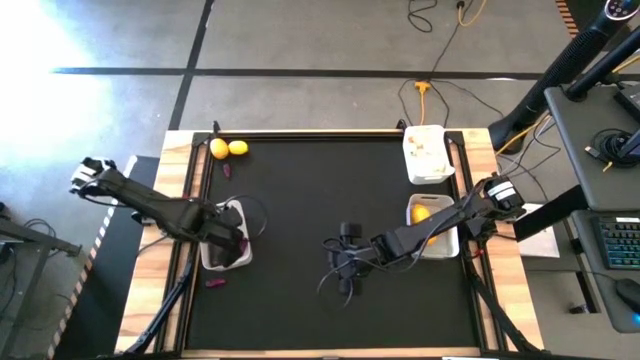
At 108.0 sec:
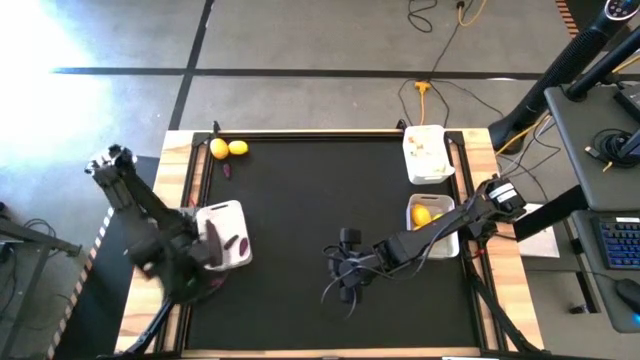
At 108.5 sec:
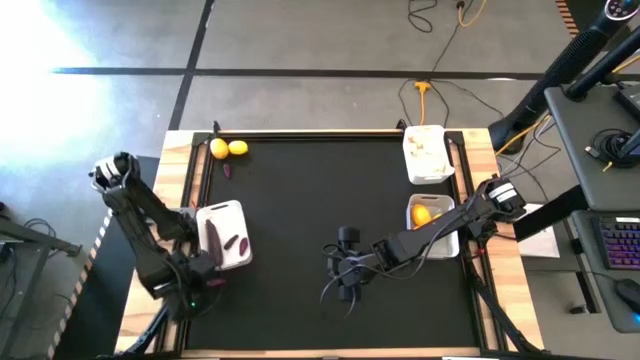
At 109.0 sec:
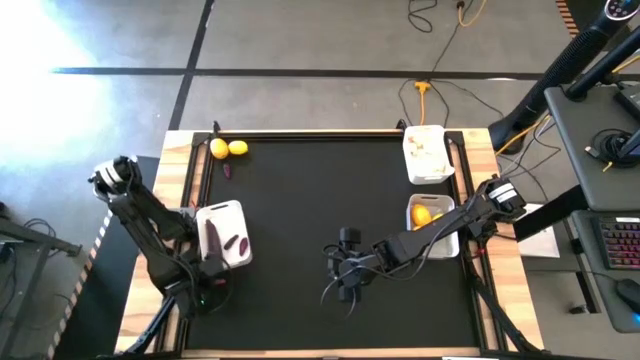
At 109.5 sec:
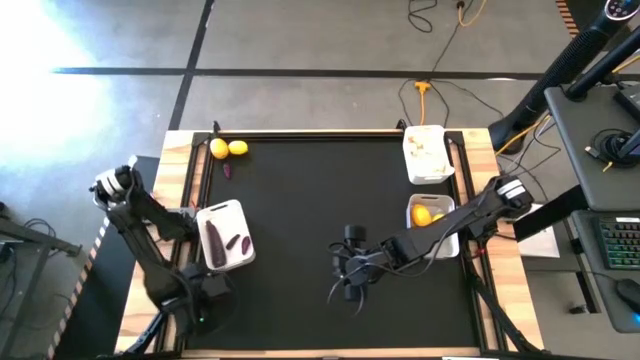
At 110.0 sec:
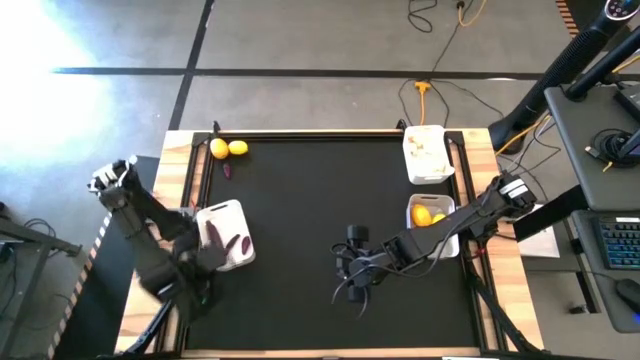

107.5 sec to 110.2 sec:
Task: Sort produce into baskets
Put the eggplant into the bottom white bin

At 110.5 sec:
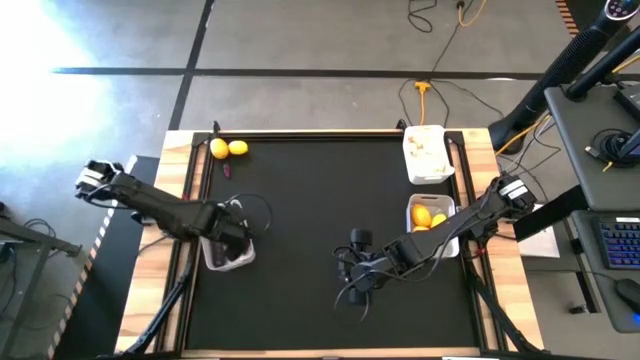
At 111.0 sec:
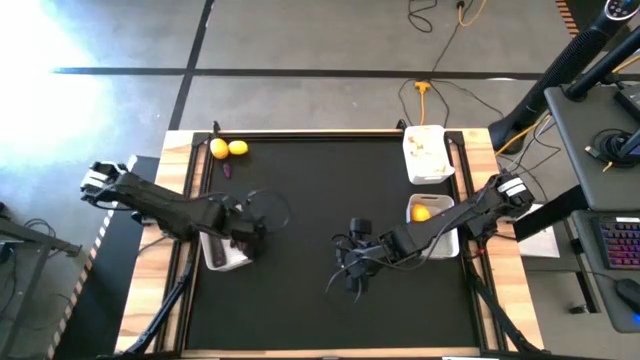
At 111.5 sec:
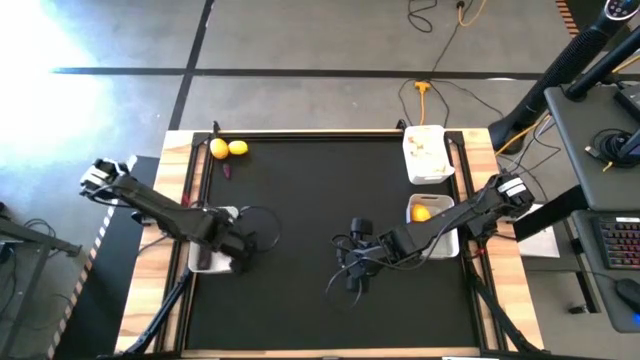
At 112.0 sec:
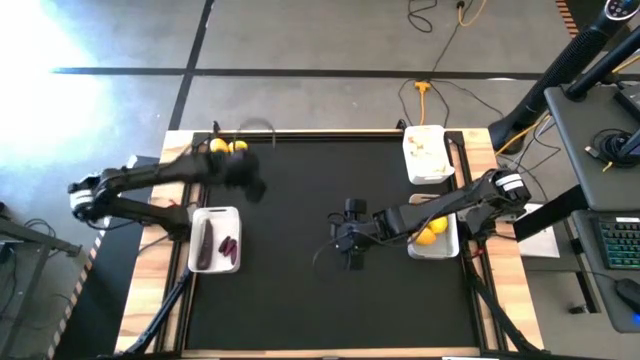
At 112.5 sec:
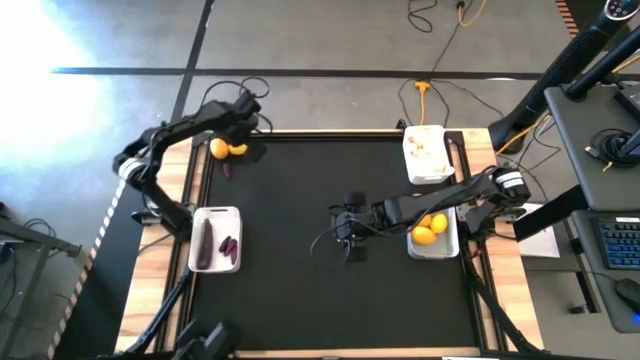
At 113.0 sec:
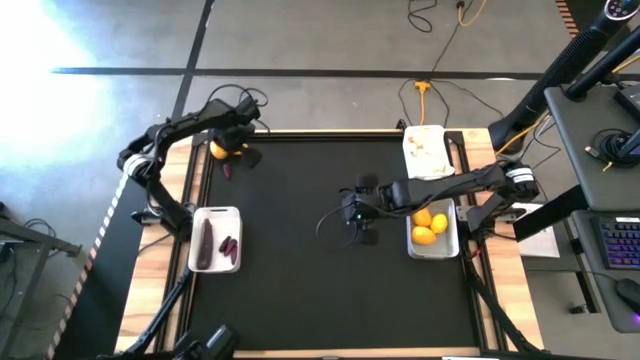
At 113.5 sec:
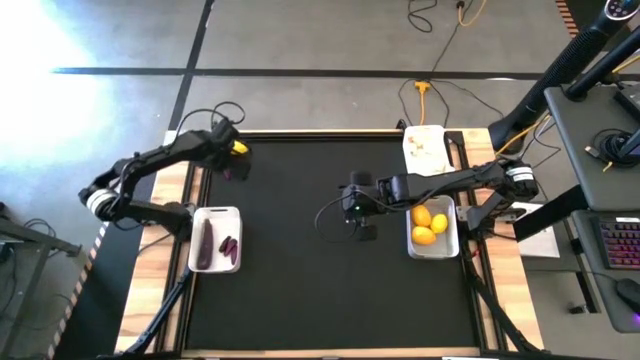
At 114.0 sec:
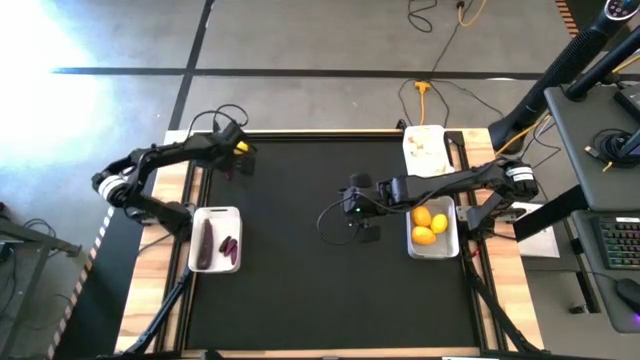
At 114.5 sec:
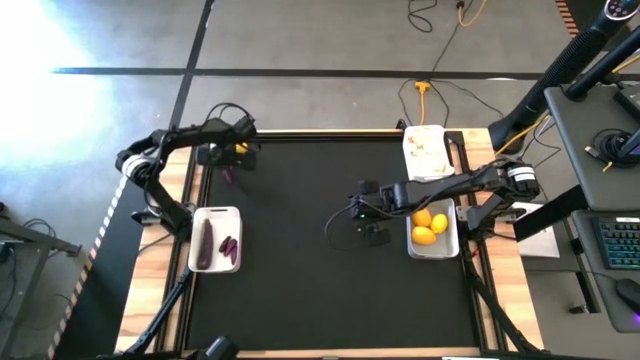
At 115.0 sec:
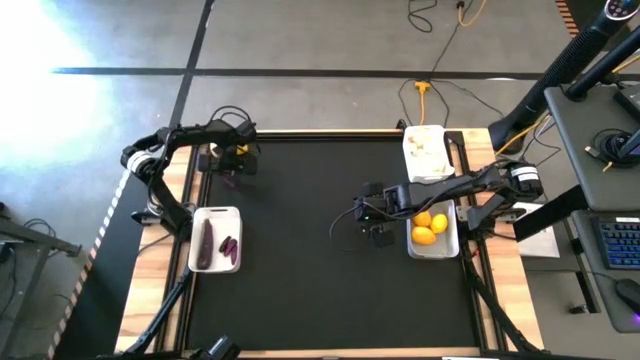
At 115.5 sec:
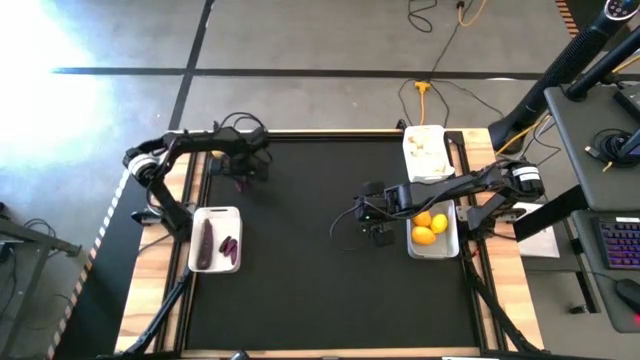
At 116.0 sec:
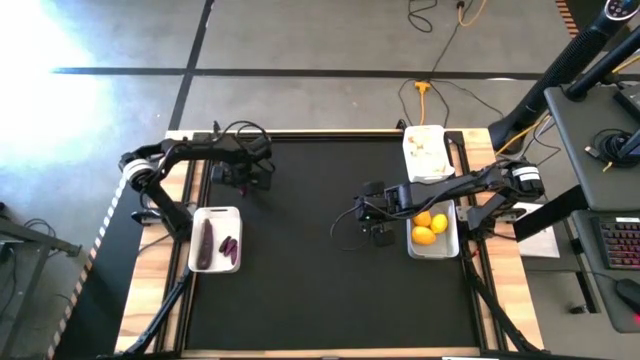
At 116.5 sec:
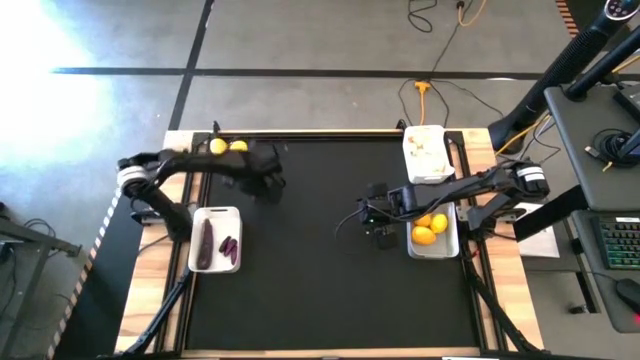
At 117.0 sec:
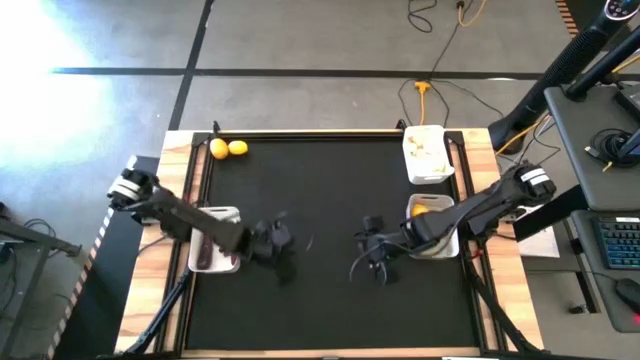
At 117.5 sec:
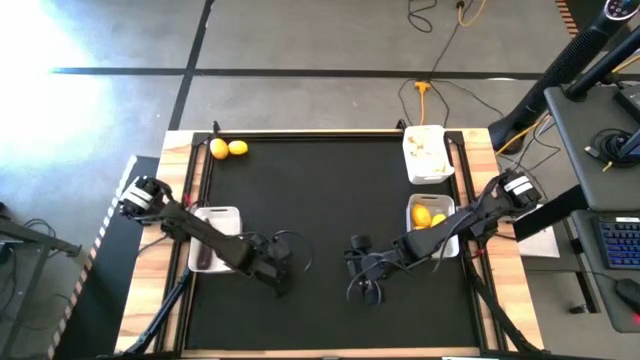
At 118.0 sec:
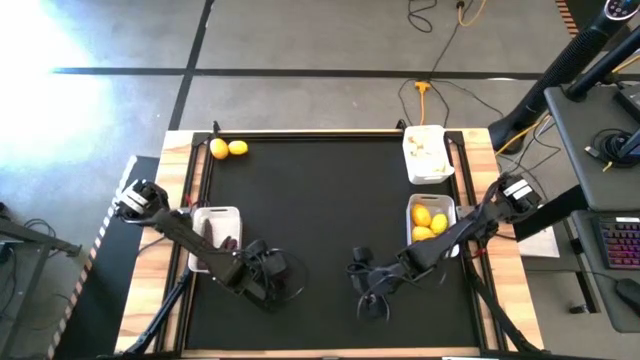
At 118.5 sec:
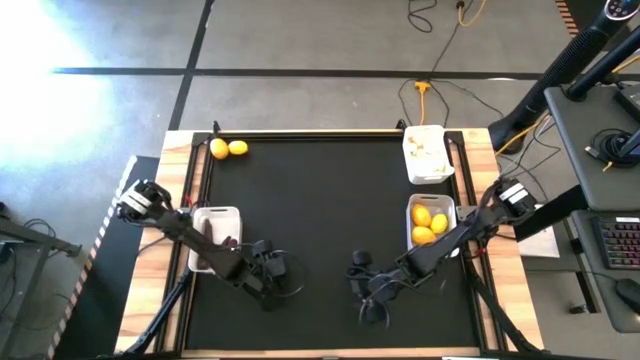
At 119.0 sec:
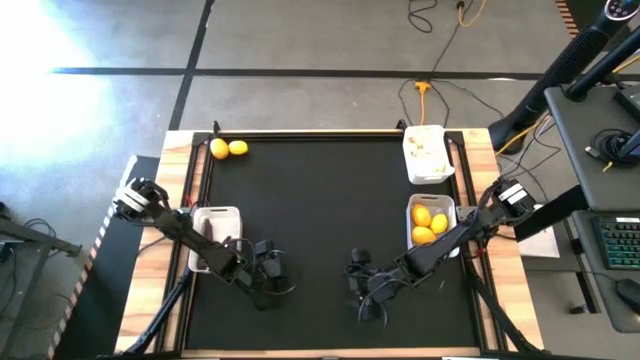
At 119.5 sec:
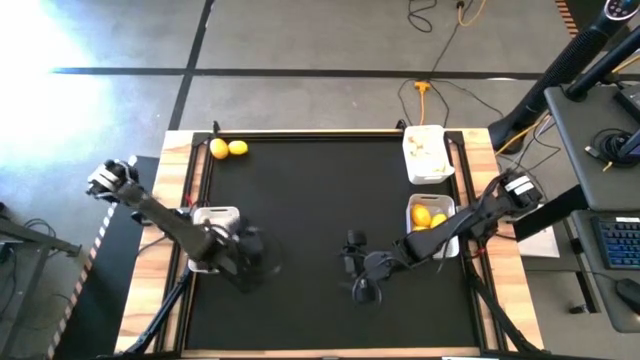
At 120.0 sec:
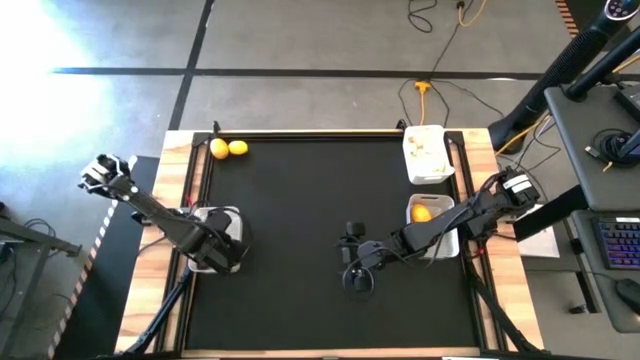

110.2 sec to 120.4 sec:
Put the eggplant into the bottom white bin

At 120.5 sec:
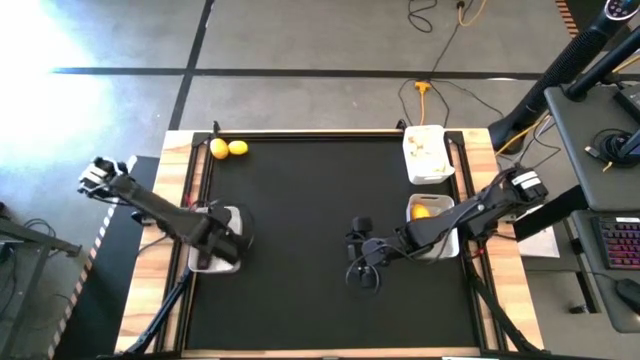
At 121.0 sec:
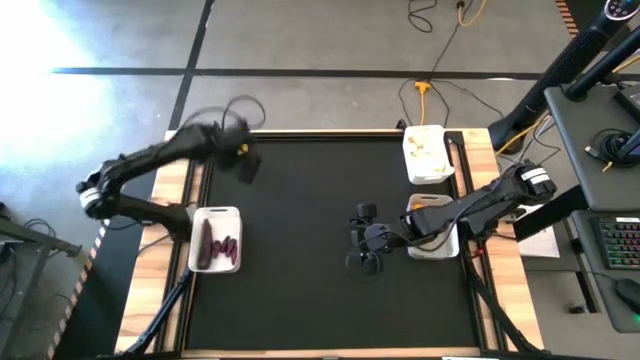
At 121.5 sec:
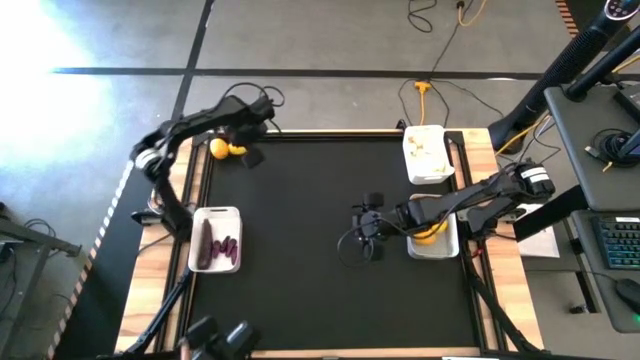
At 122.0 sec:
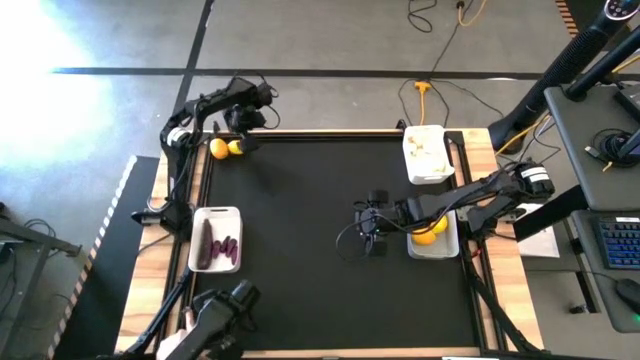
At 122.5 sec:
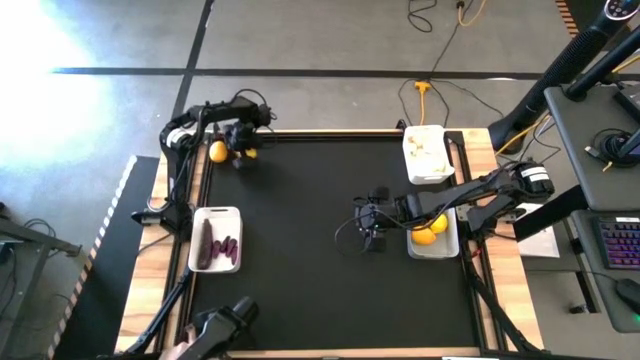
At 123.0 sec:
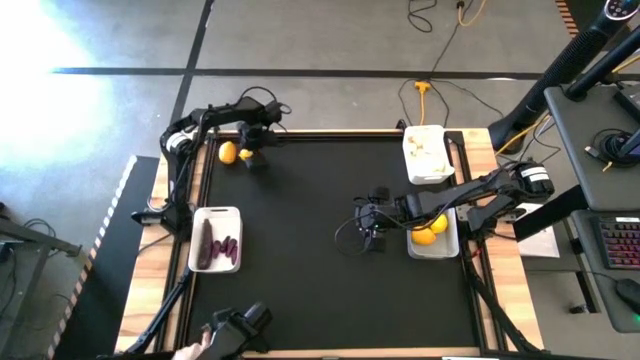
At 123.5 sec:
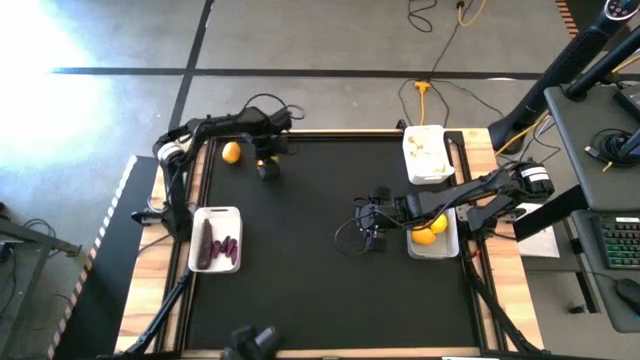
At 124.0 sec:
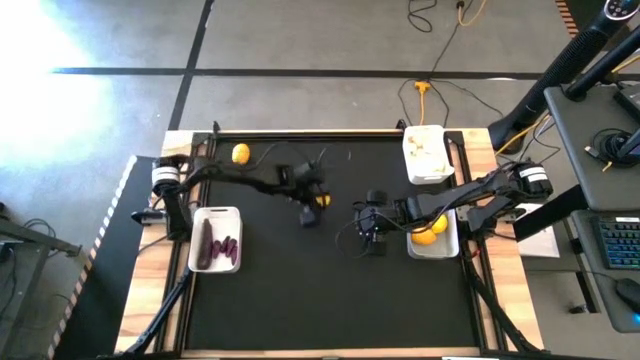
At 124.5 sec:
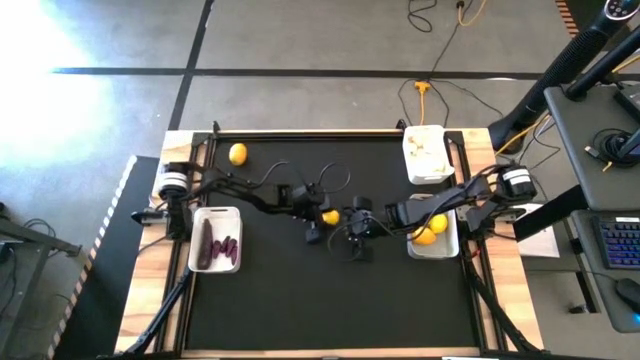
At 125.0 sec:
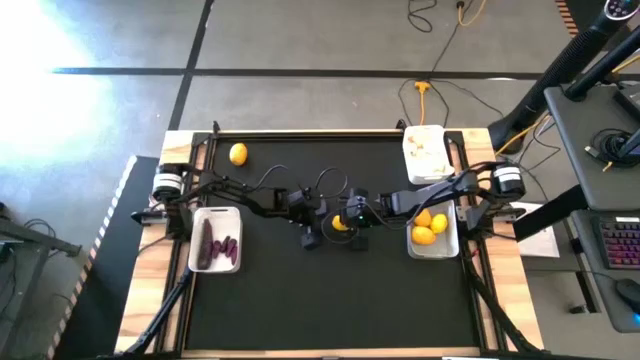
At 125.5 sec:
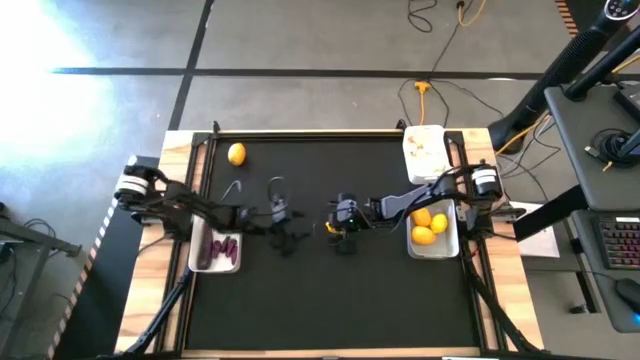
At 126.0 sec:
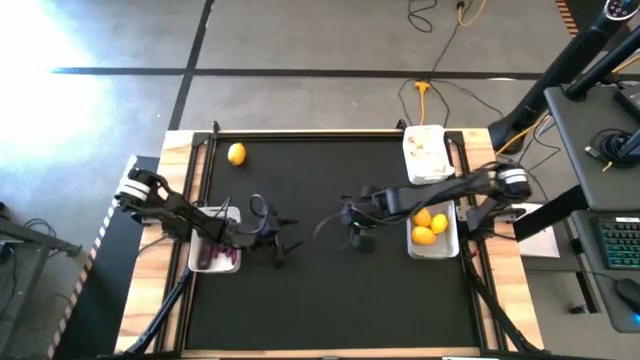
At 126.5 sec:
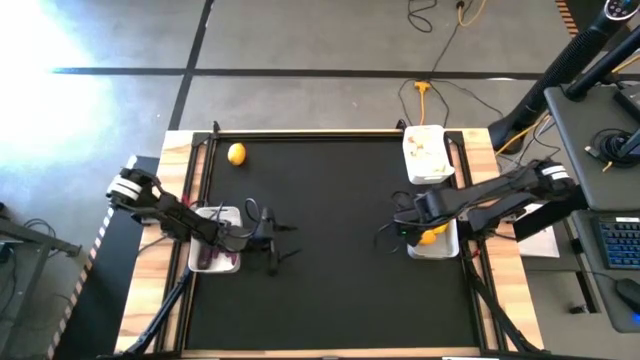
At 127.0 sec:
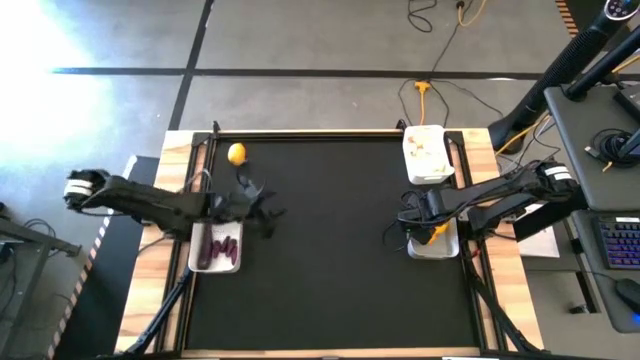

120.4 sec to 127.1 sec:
Put the lemon into the gray bin
